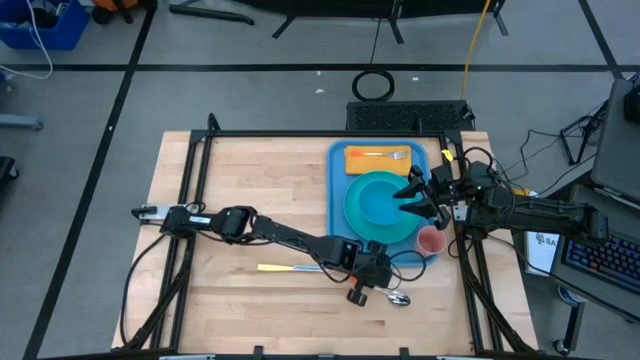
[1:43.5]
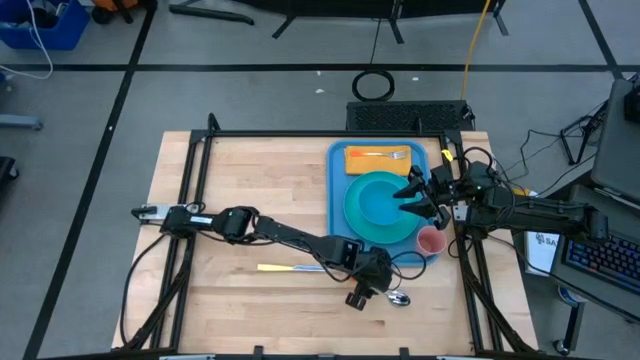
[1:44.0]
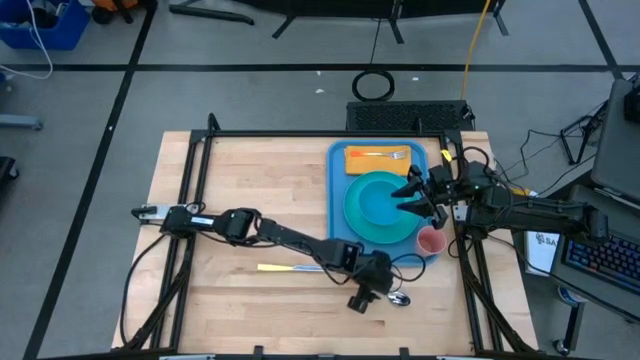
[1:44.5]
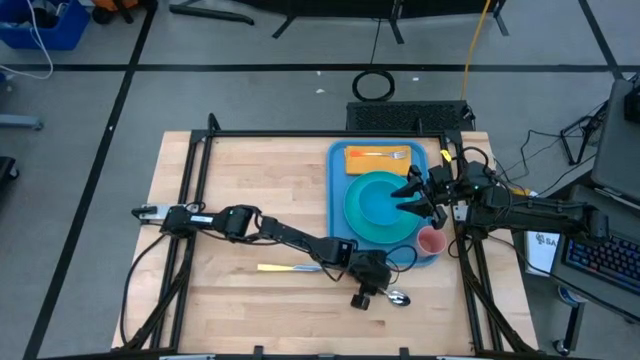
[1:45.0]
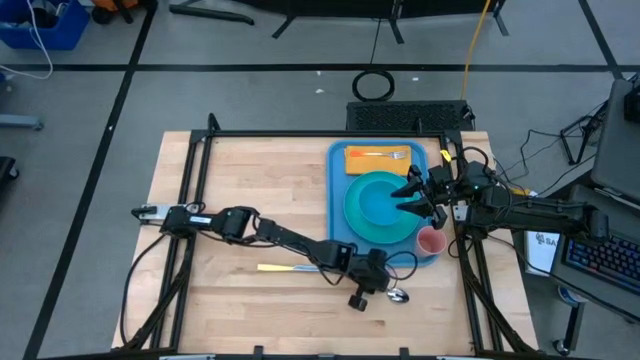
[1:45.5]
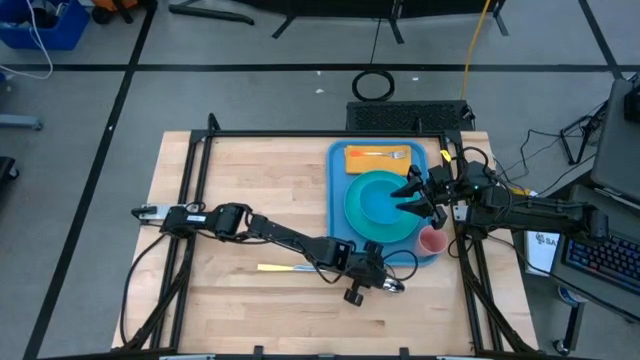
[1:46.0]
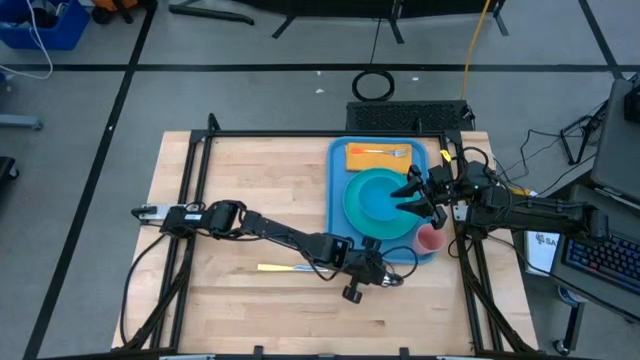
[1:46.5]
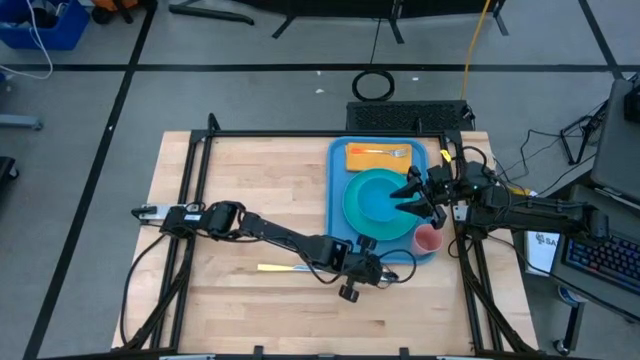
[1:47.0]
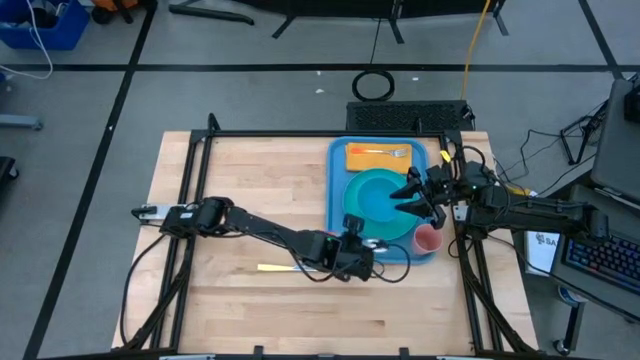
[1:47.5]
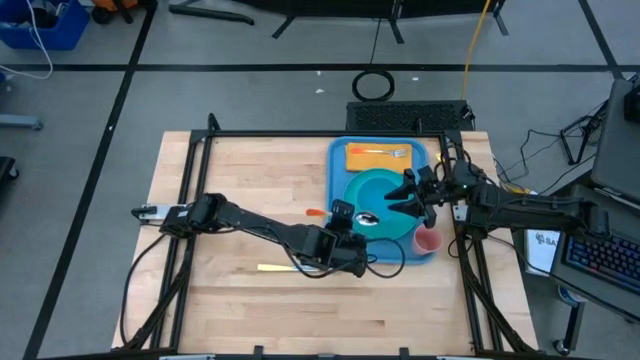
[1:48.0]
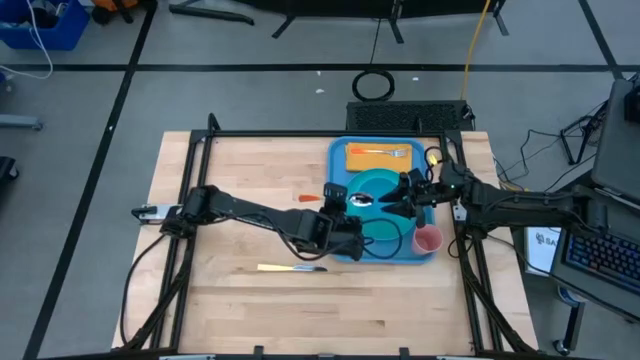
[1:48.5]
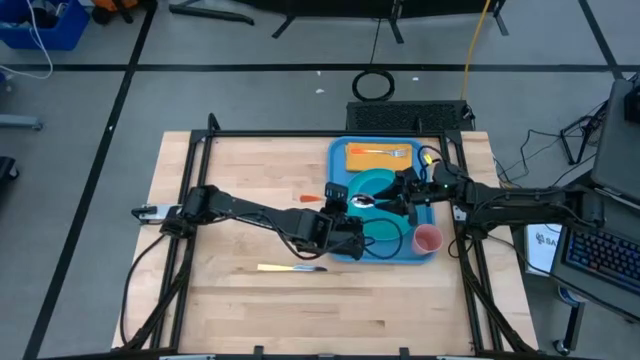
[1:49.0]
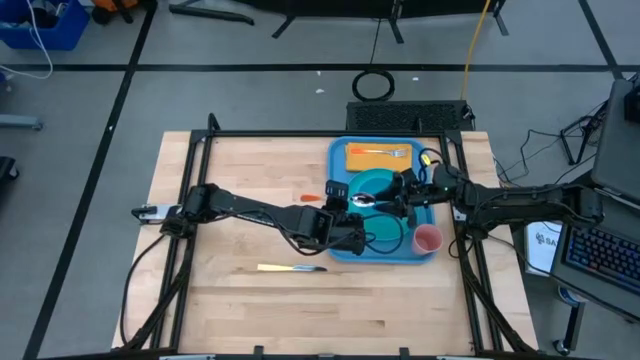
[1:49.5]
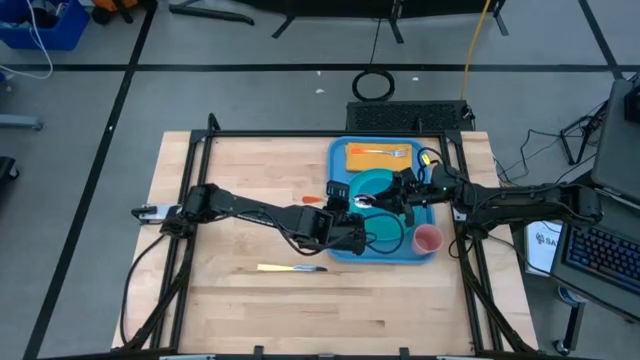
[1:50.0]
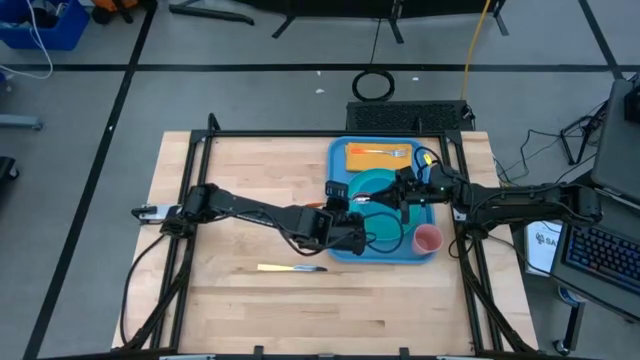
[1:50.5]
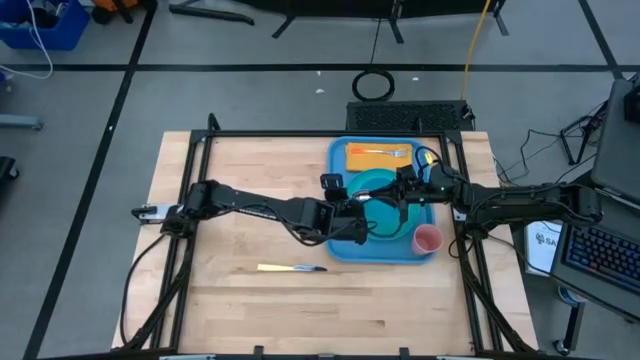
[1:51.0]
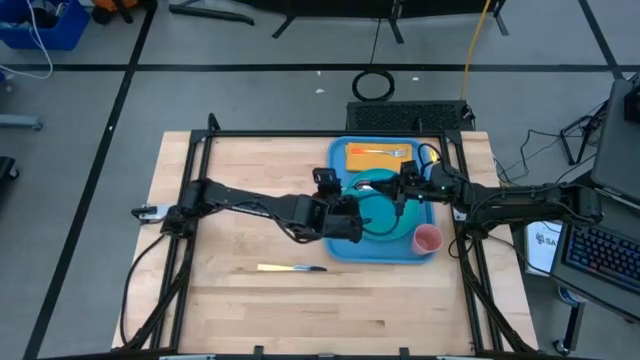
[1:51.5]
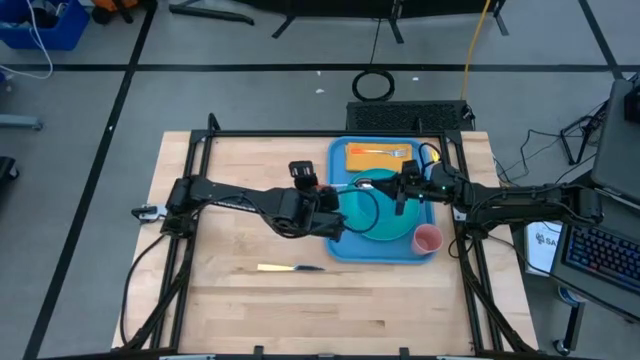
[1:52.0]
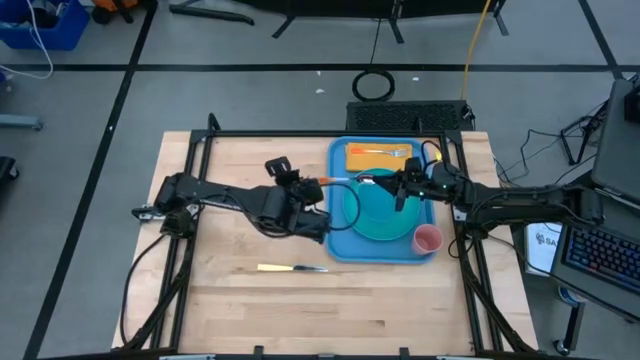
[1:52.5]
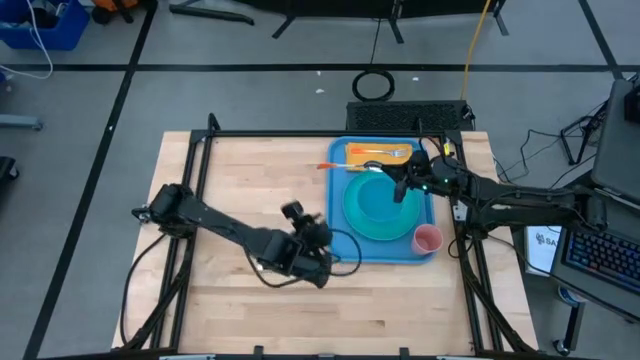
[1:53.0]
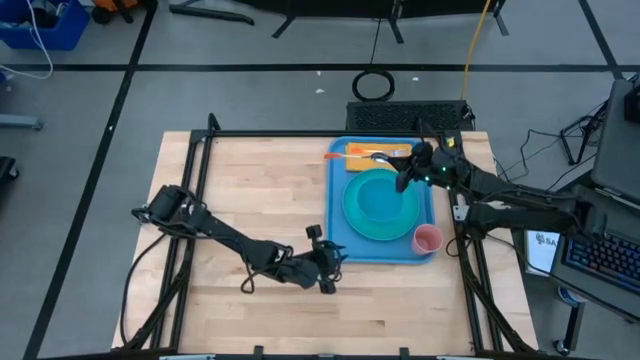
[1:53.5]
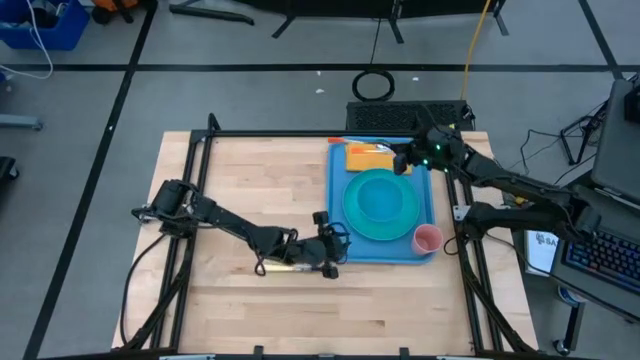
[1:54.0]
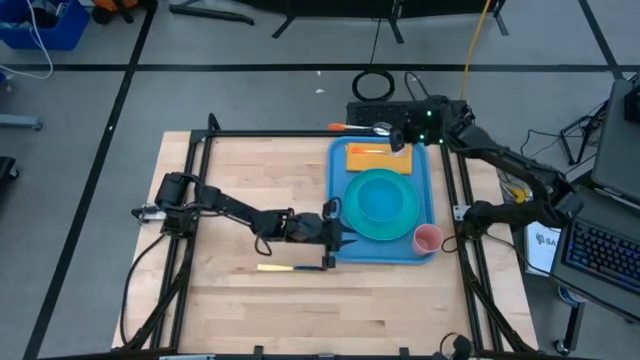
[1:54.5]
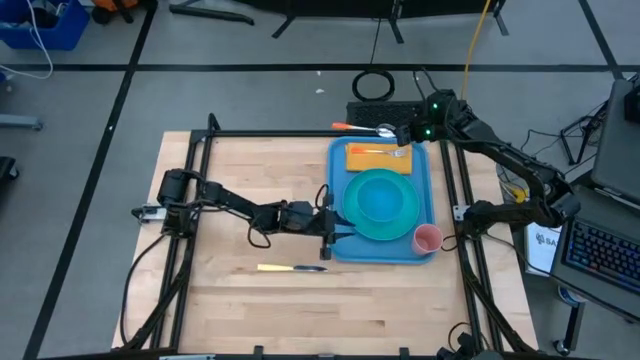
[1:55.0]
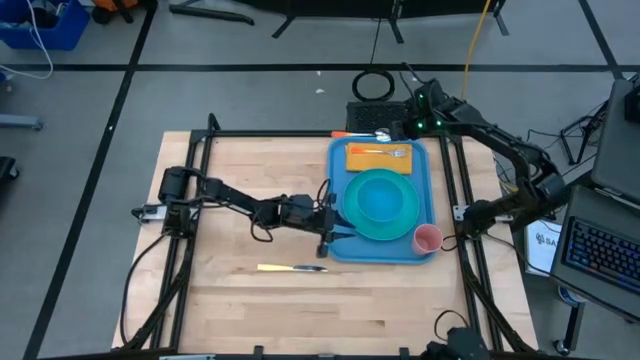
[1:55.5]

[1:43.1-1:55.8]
Task: Set up tray
Put the orange spoon to the right of the orange fork on the yellow table napkin on the blue serving tray

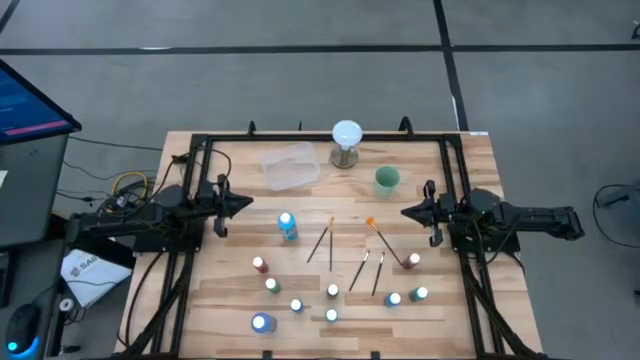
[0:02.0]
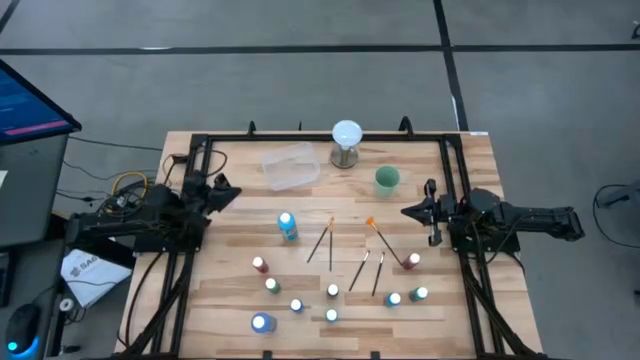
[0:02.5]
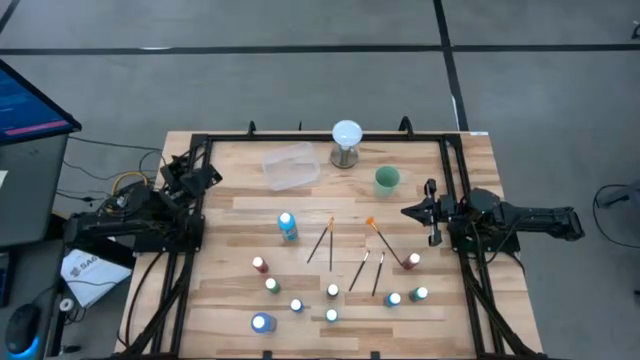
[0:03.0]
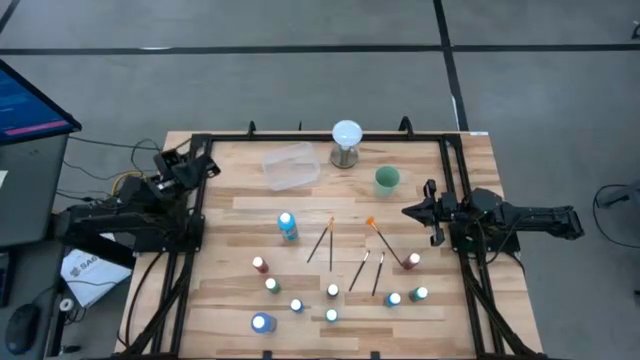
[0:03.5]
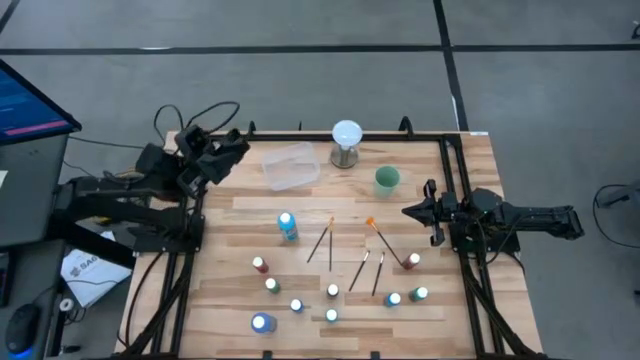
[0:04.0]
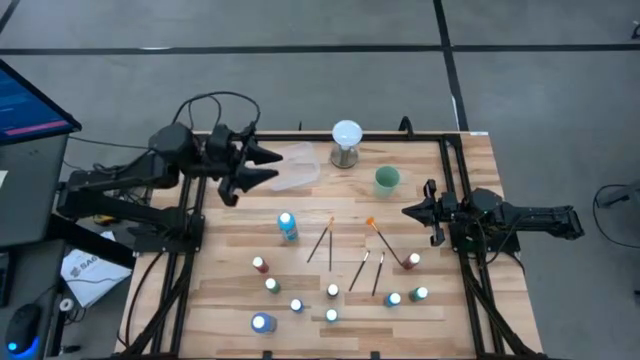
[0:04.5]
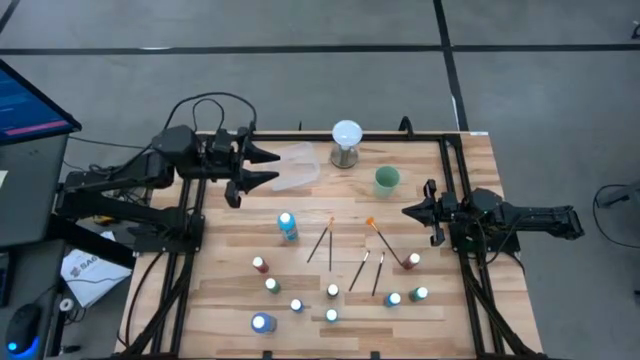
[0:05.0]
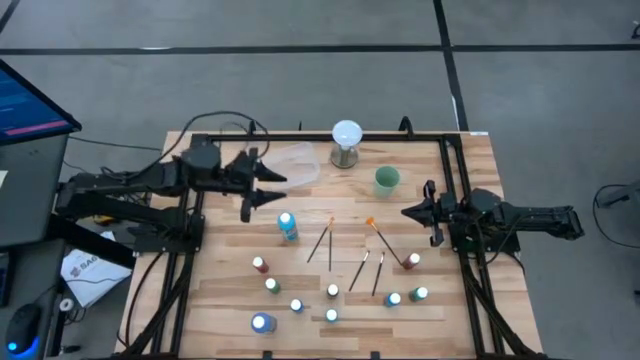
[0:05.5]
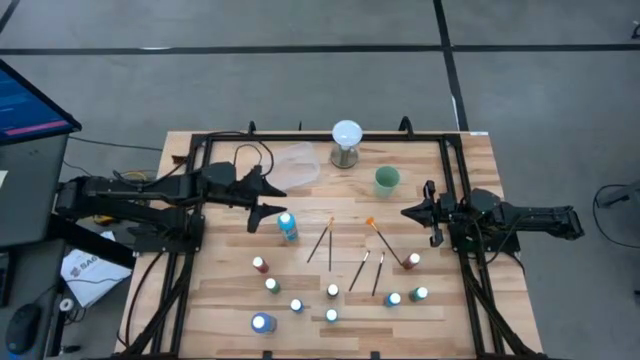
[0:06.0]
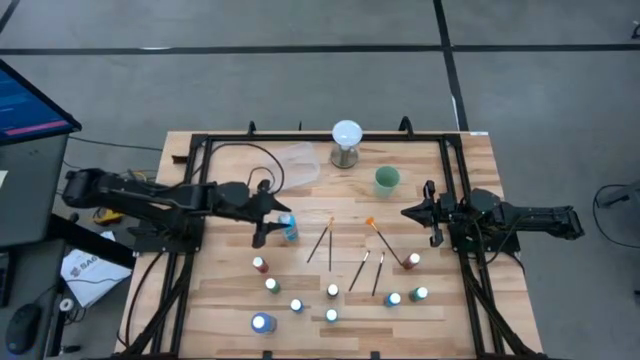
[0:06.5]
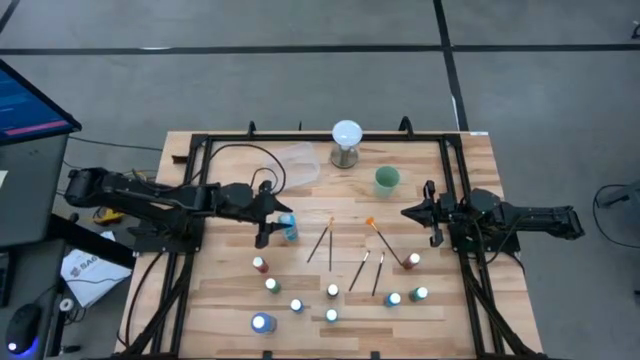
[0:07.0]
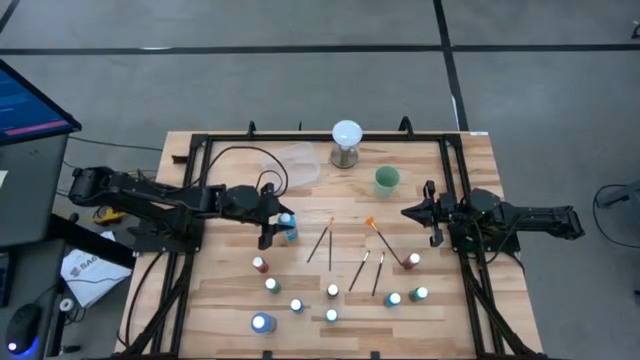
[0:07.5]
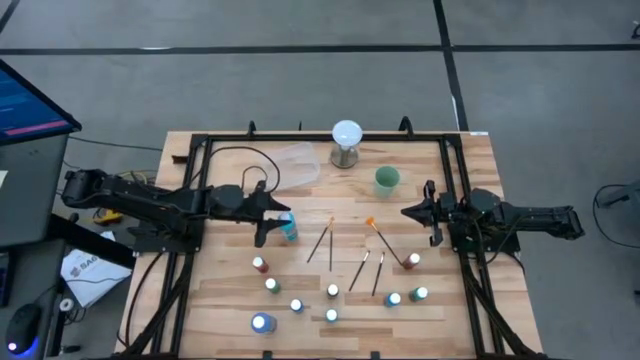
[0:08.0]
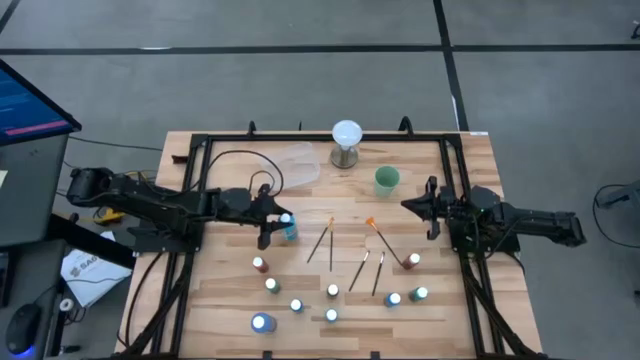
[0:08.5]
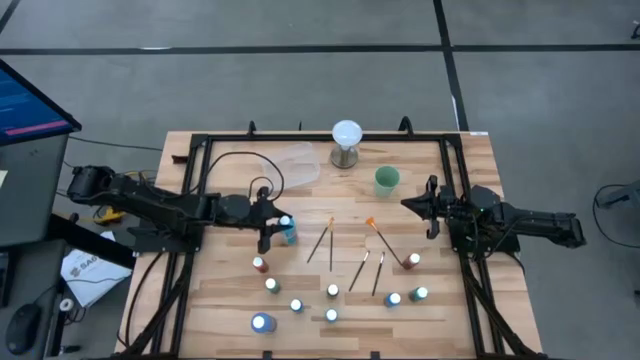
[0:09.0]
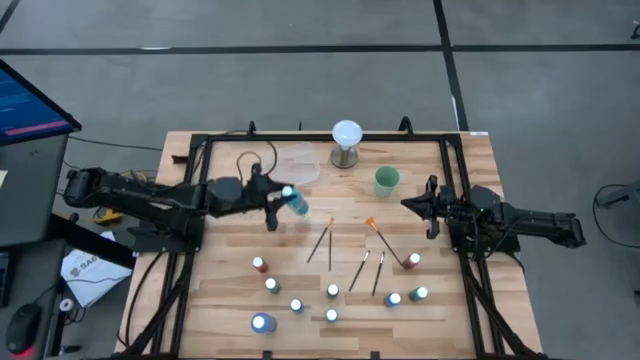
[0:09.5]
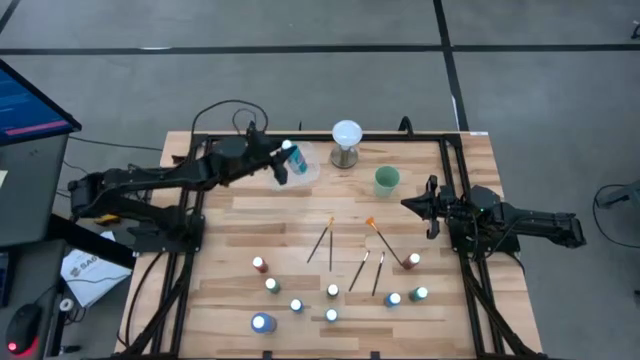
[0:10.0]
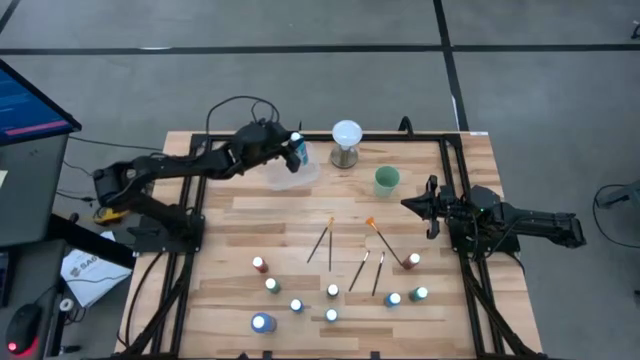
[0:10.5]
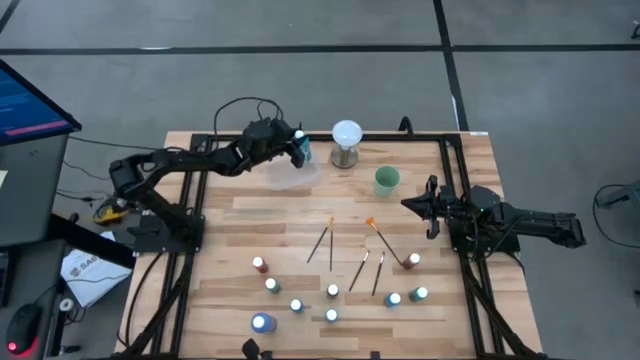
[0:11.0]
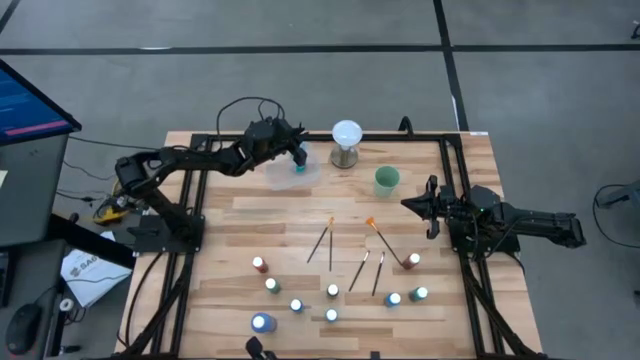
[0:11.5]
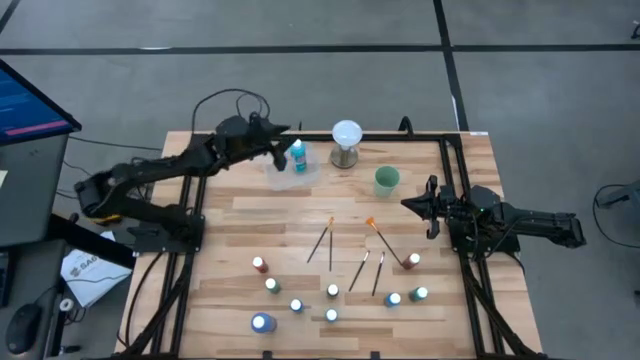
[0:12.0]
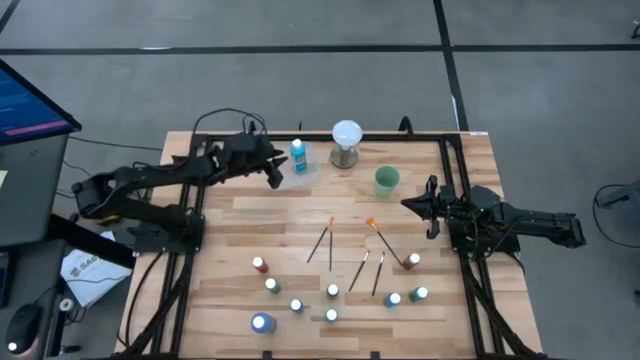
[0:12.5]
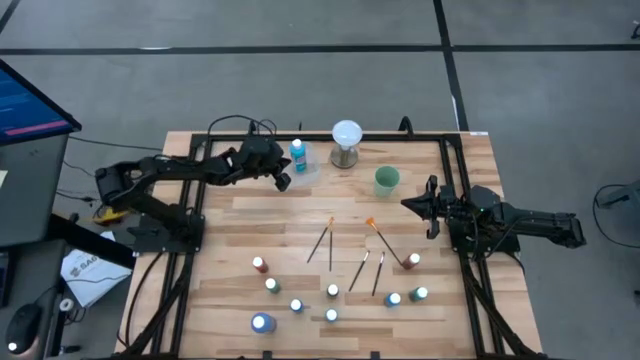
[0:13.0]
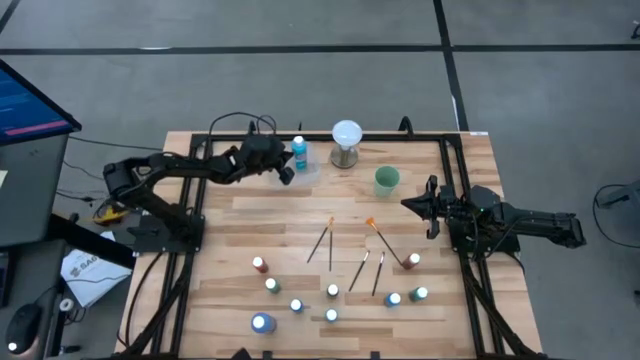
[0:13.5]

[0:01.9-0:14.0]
Task: Pick & Place Paint Supplies
Put the big light blue paint bottle into the transparent bin
